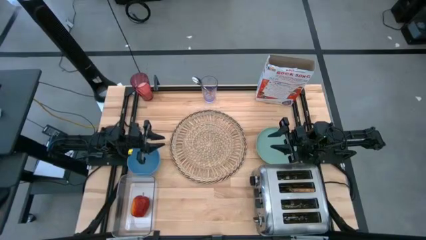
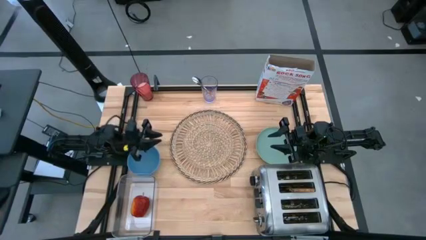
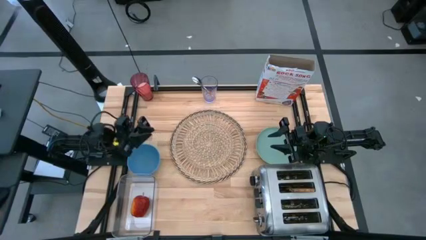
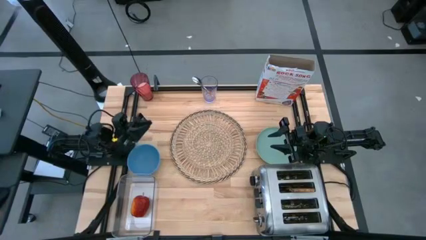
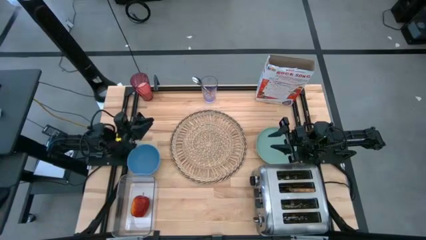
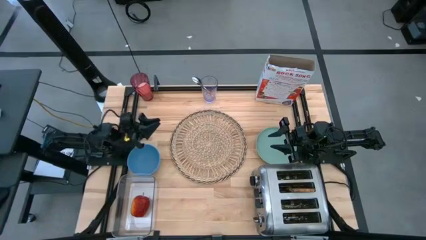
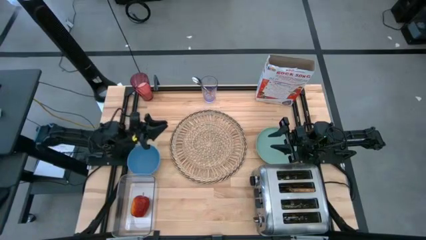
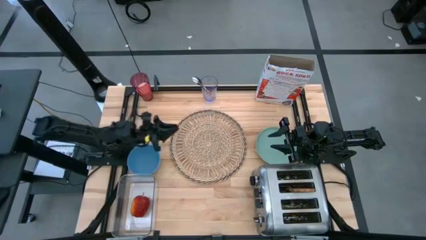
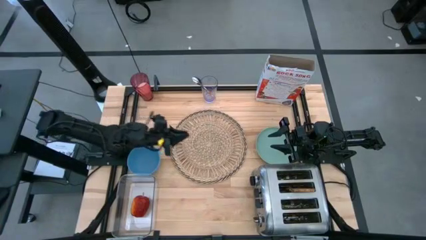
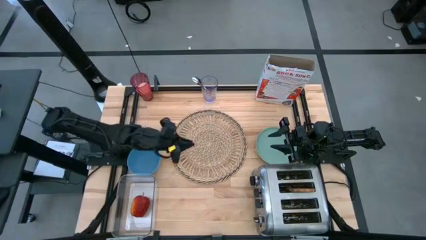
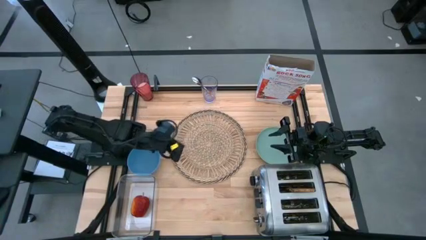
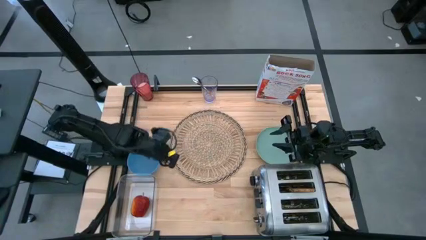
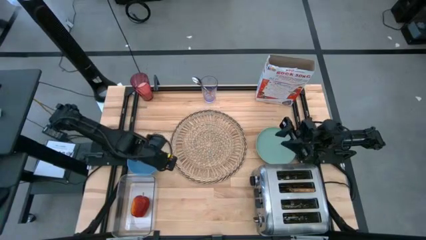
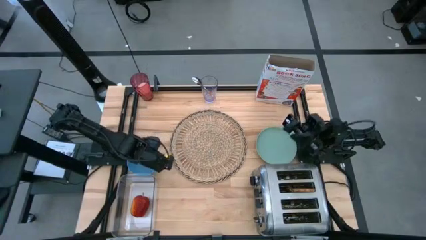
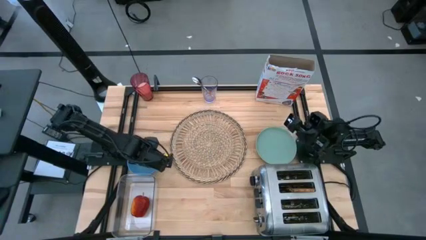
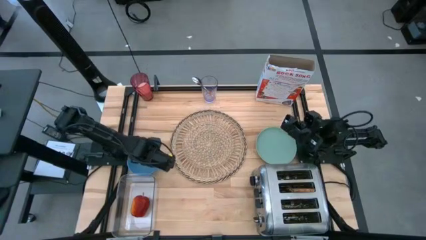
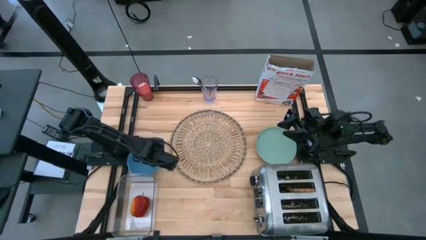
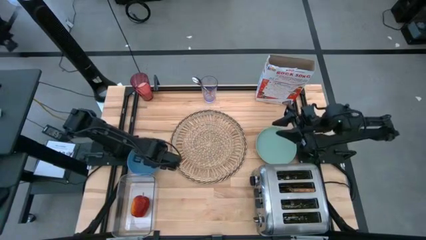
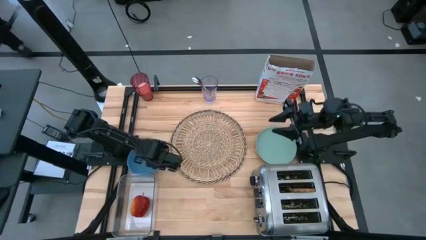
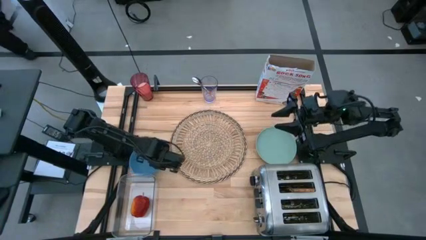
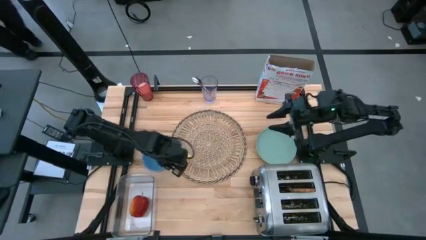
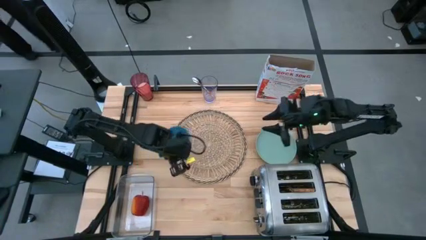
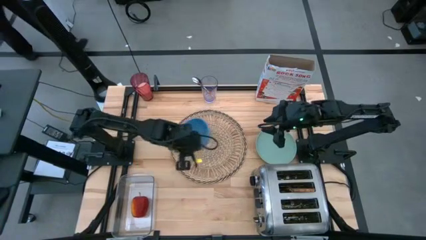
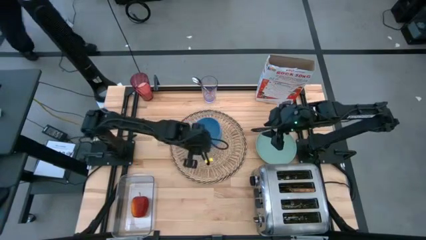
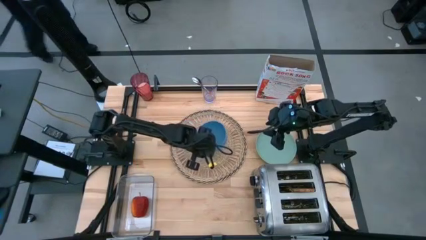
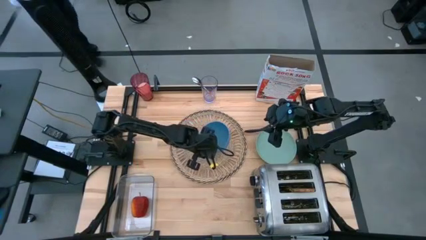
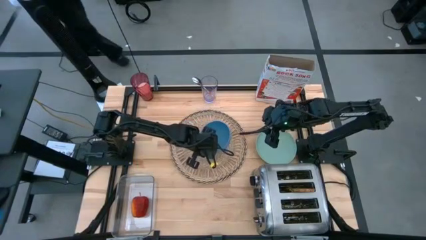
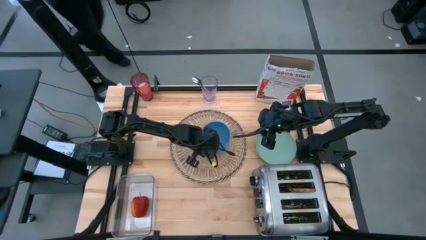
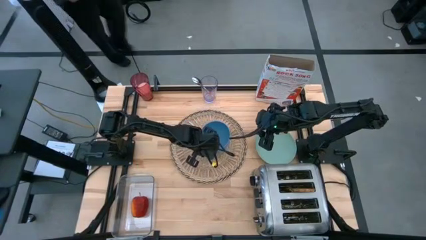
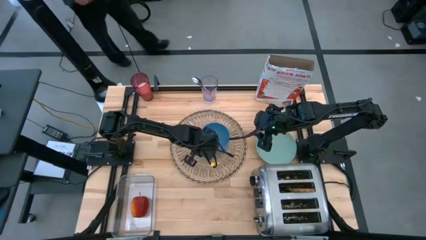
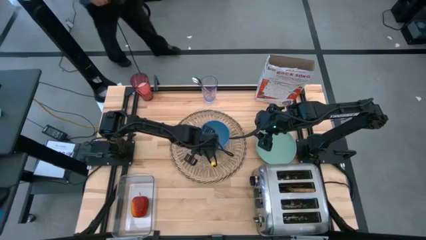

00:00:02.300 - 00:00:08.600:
Task: Arrange a breakfast setting
Put the blue bowl on the brown table mat

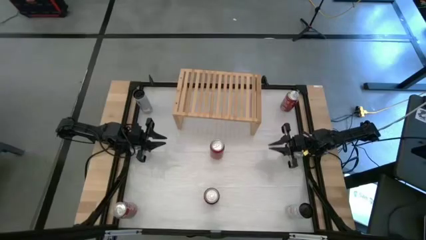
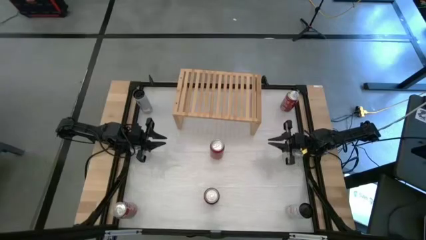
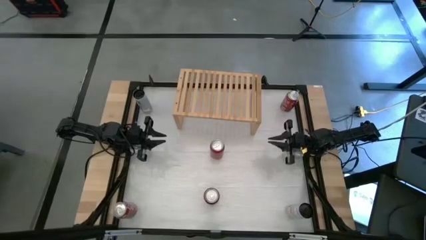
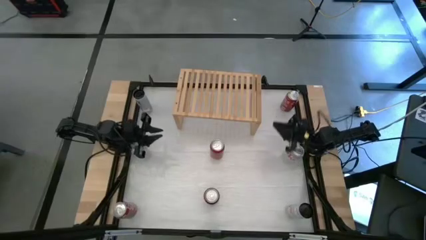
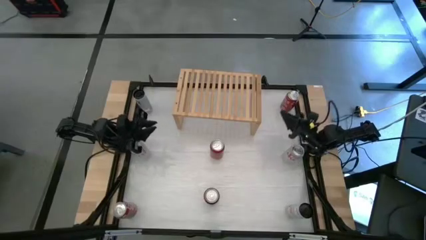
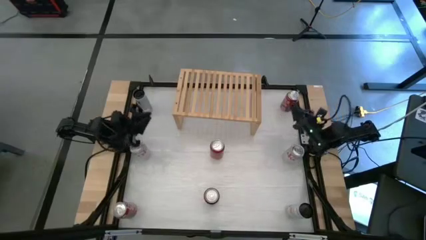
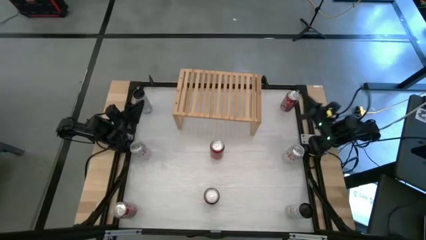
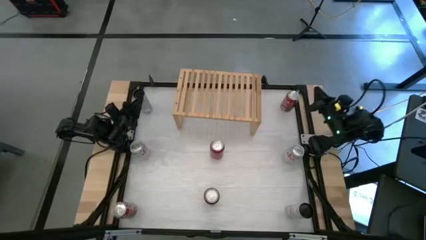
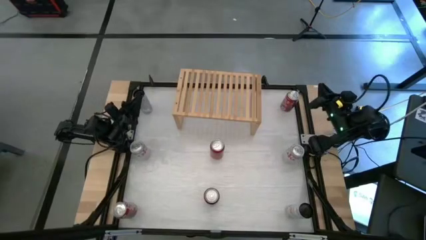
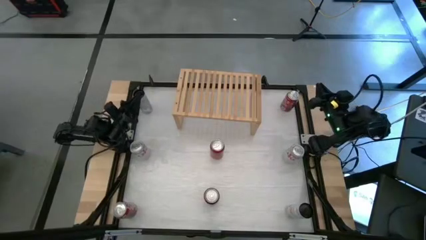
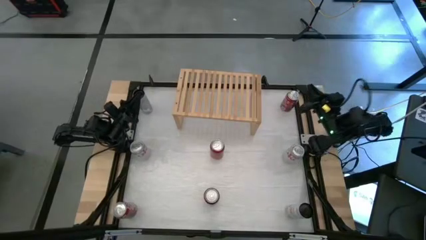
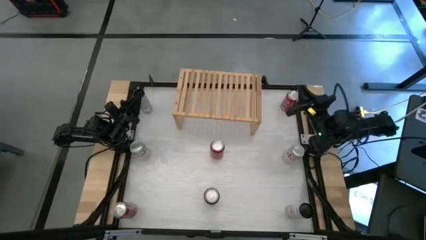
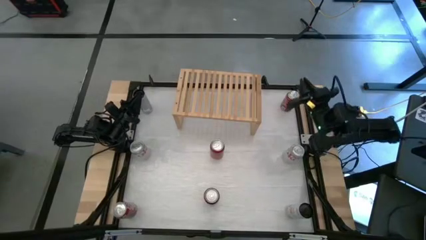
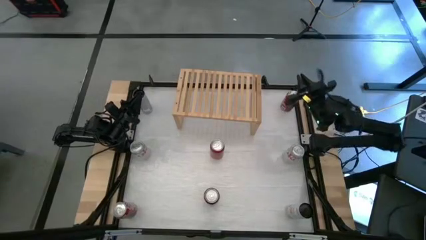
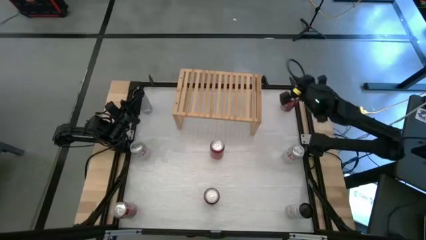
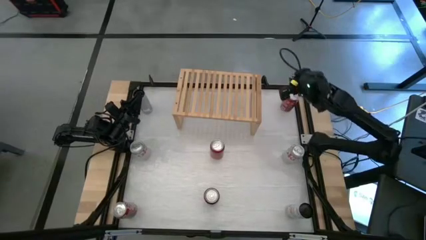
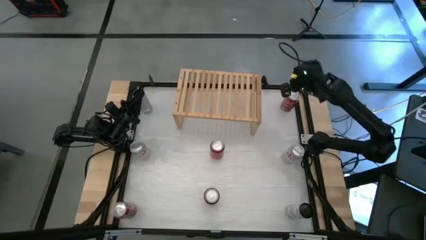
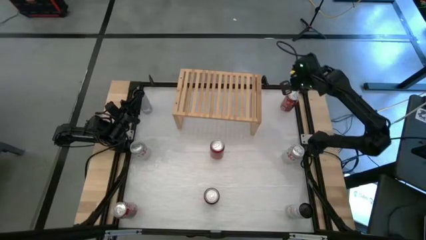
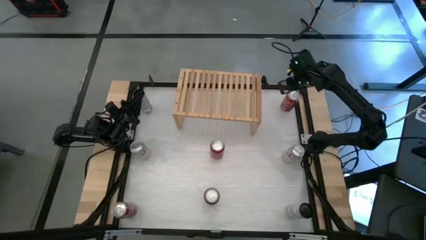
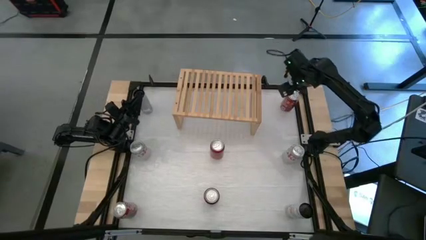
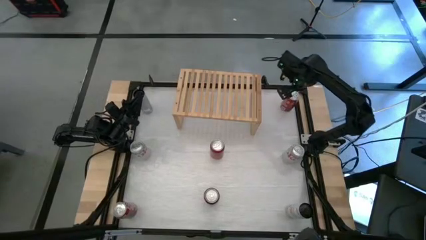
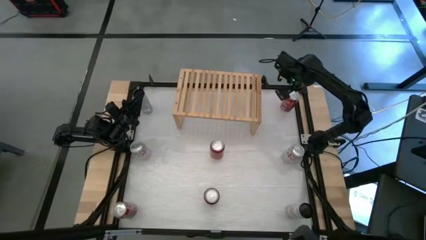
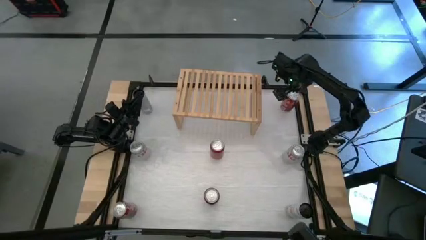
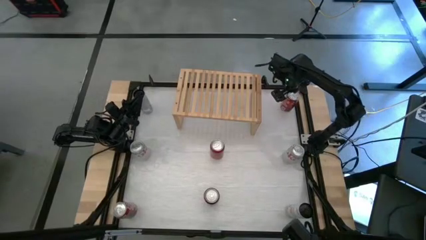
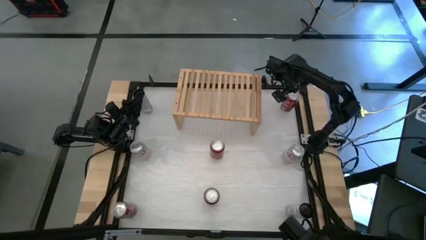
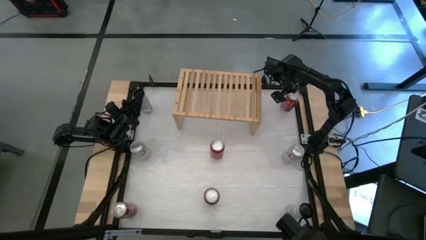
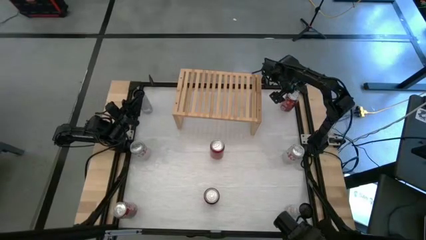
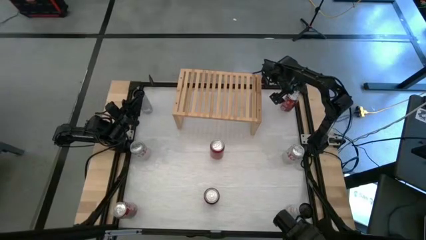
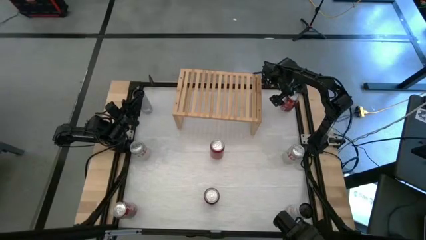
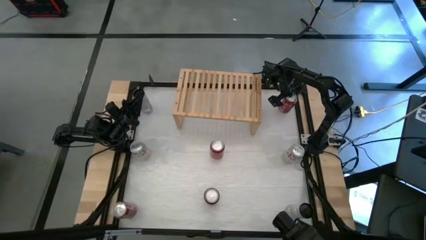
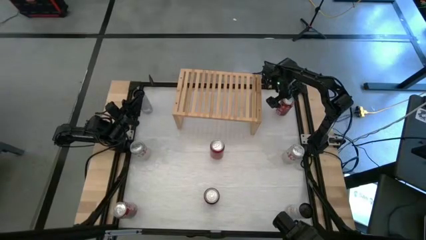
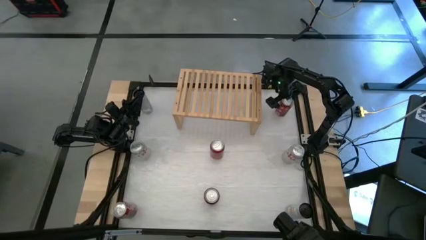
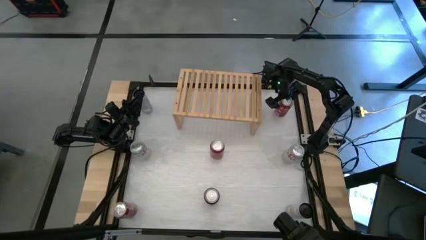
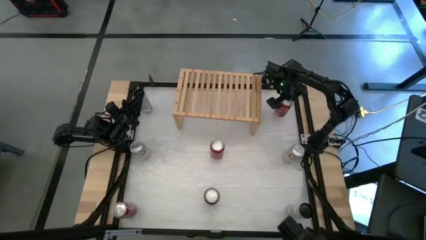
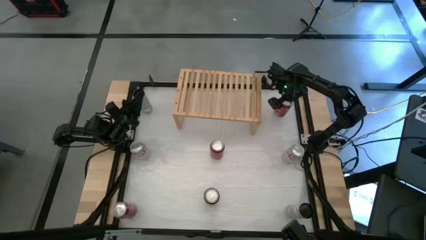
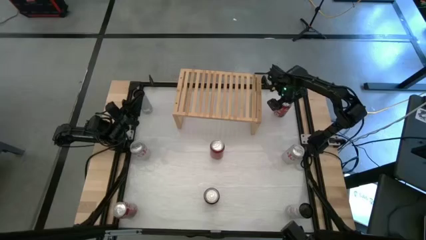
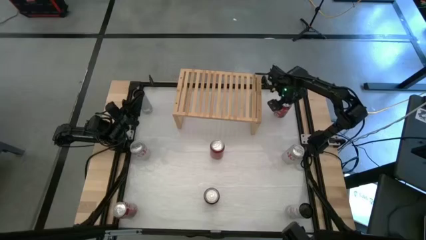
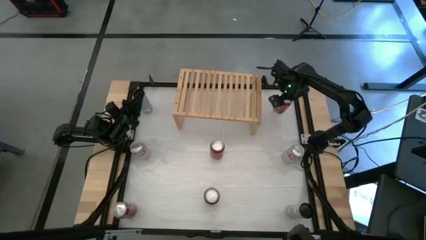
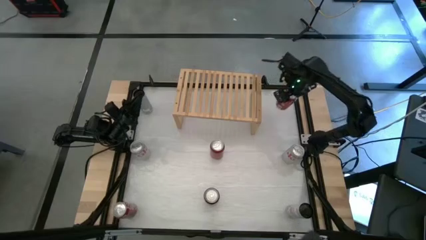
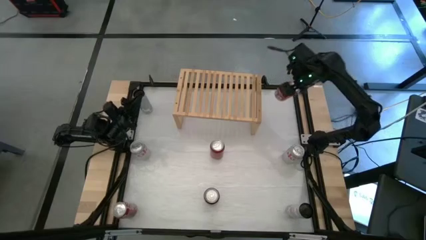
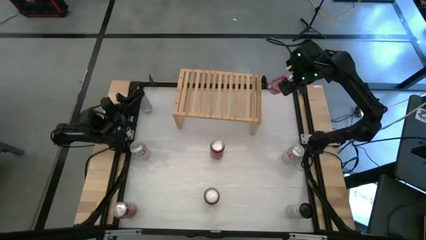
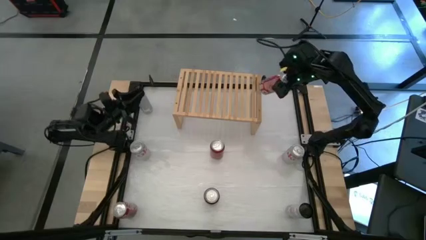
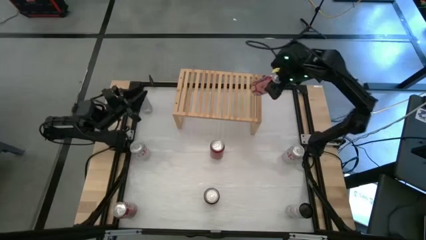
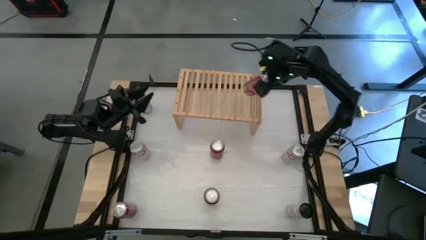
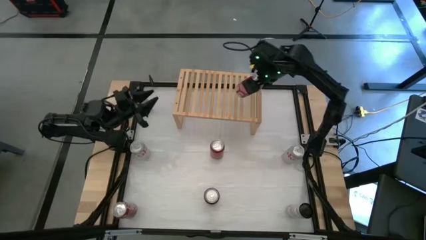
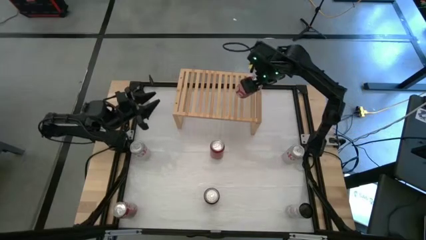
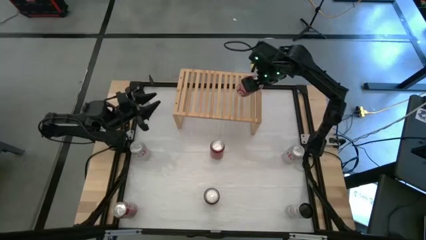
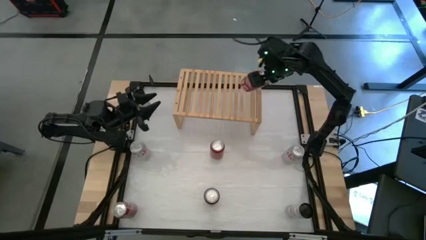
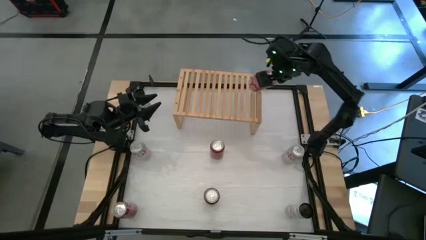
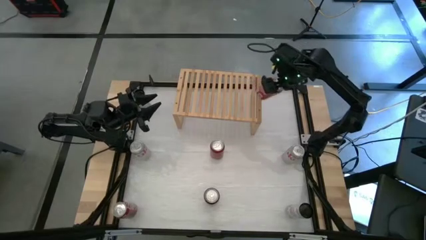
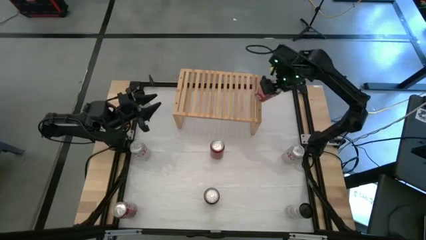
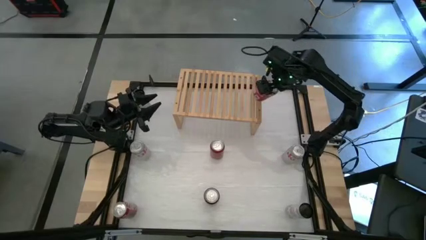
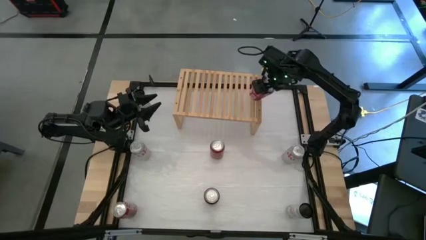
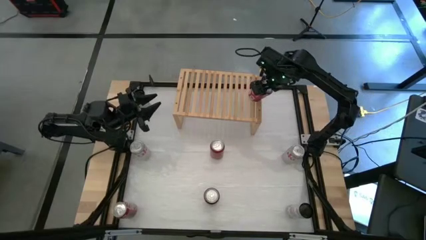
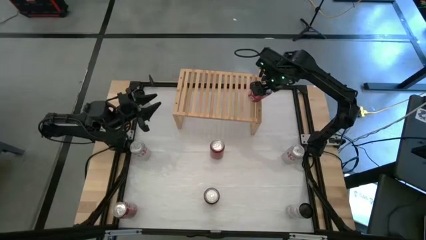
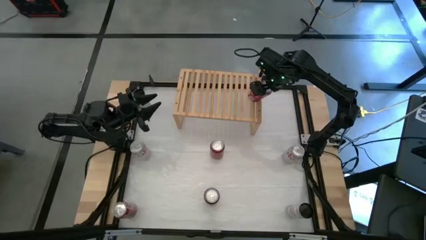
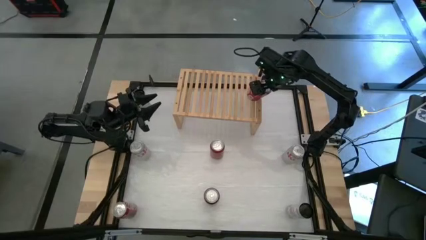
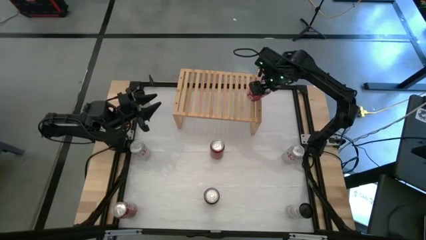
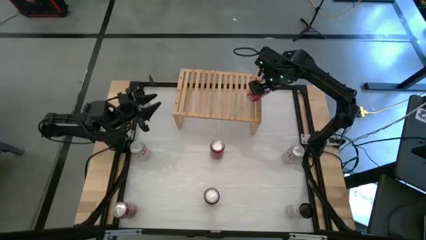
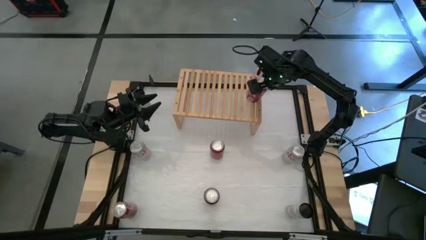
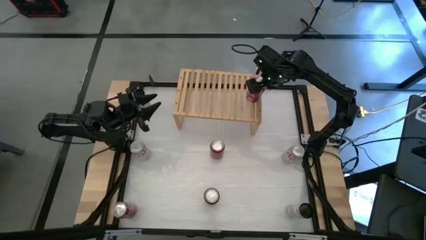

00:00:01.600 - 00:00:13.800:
Task: Place canned beverage on shelf
Put the top red and white soda can on the shelf
